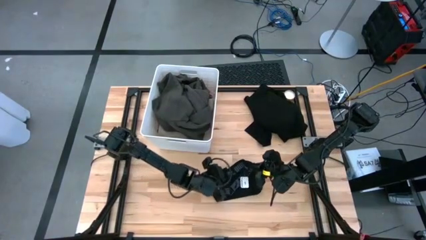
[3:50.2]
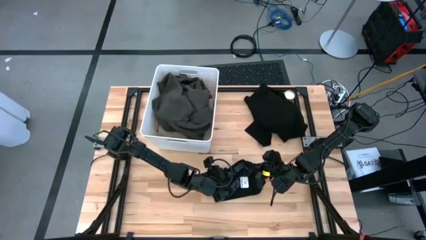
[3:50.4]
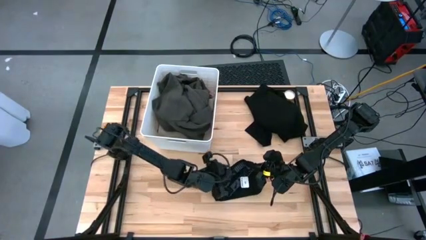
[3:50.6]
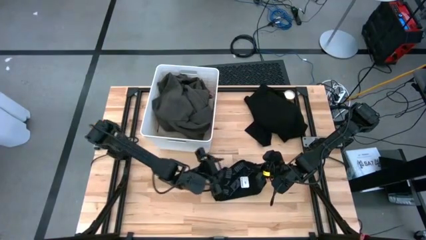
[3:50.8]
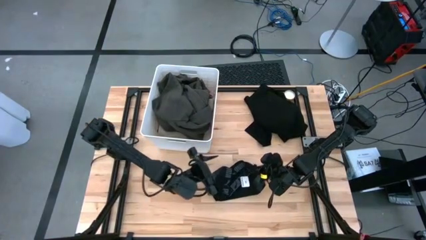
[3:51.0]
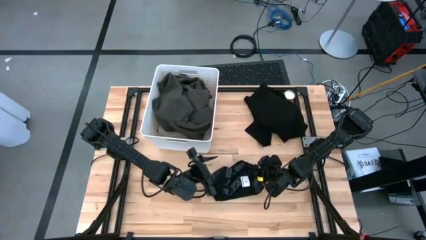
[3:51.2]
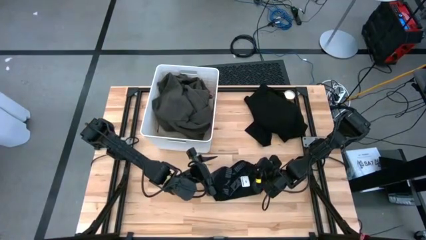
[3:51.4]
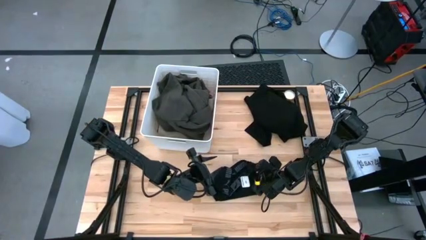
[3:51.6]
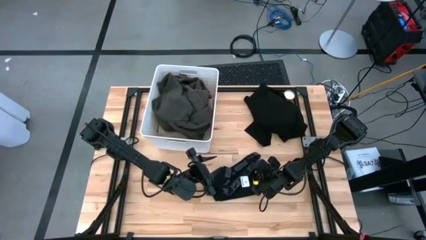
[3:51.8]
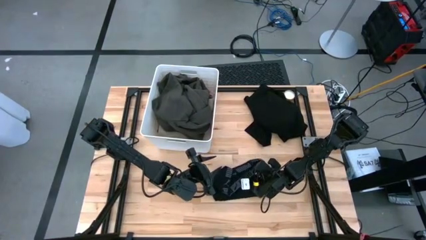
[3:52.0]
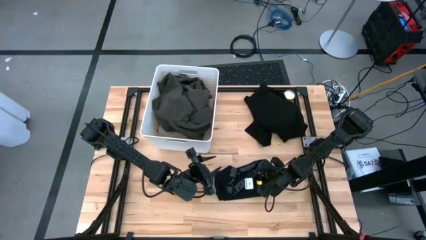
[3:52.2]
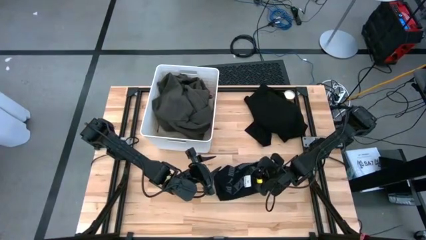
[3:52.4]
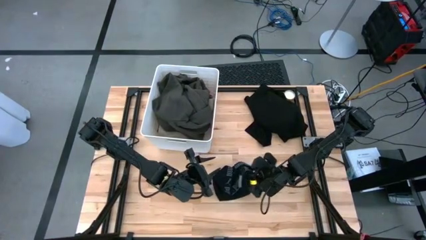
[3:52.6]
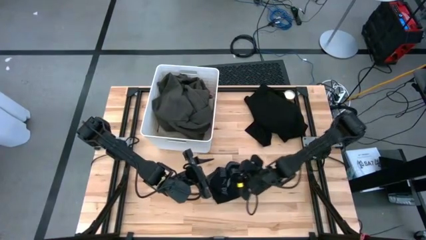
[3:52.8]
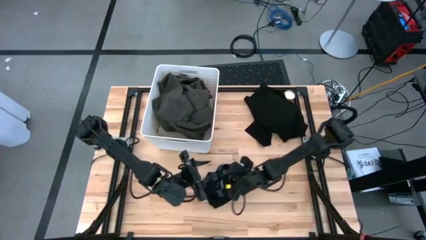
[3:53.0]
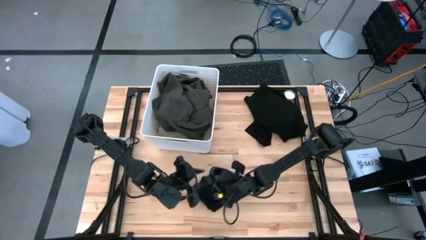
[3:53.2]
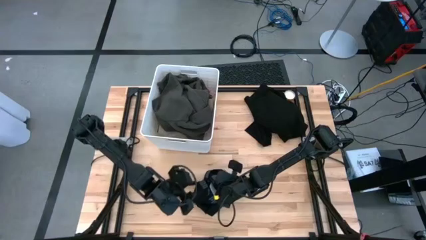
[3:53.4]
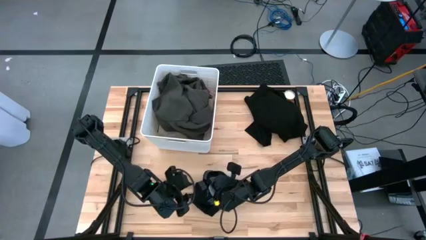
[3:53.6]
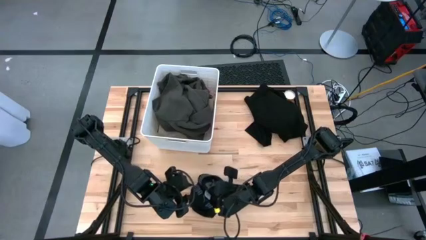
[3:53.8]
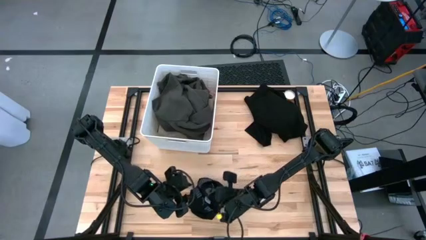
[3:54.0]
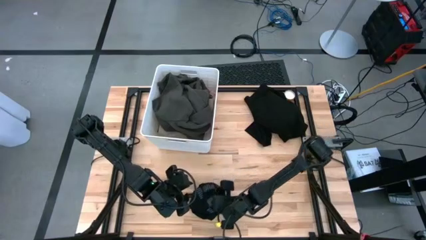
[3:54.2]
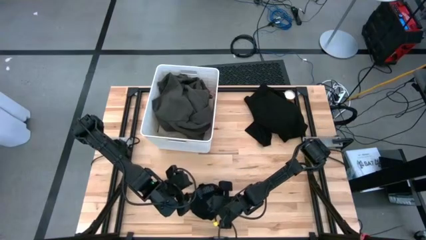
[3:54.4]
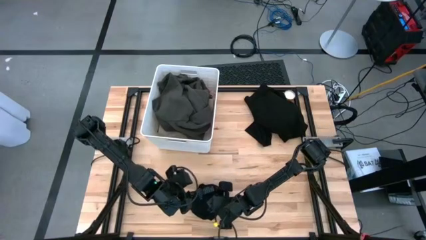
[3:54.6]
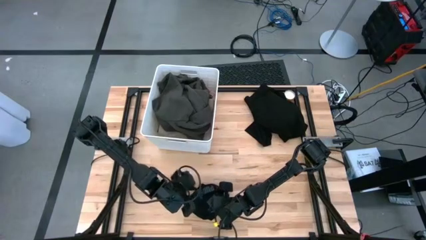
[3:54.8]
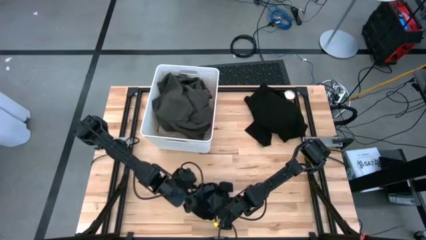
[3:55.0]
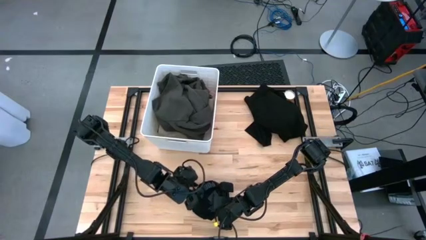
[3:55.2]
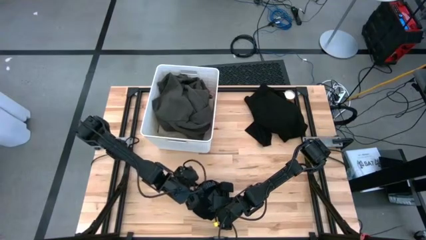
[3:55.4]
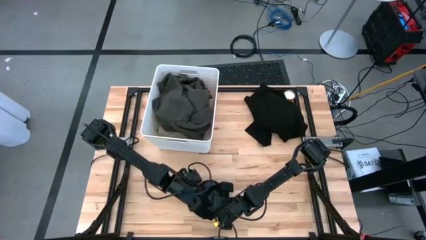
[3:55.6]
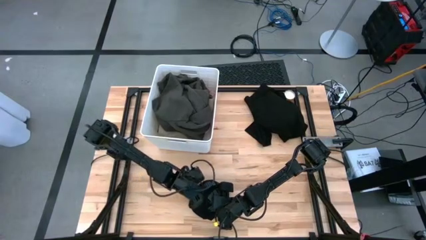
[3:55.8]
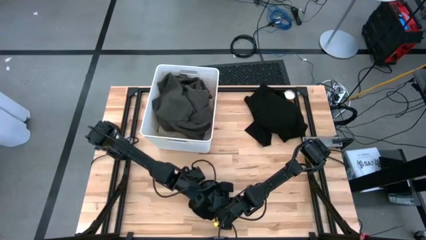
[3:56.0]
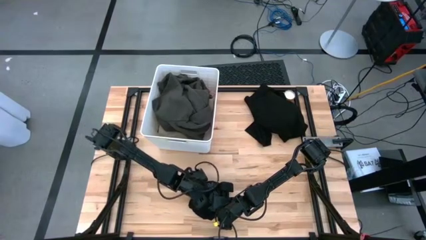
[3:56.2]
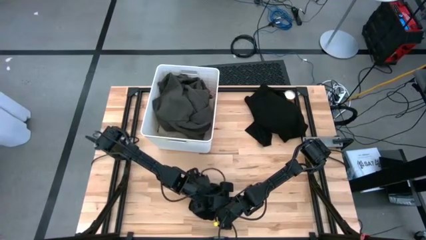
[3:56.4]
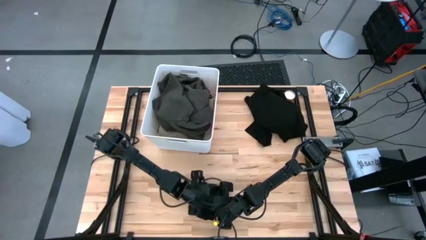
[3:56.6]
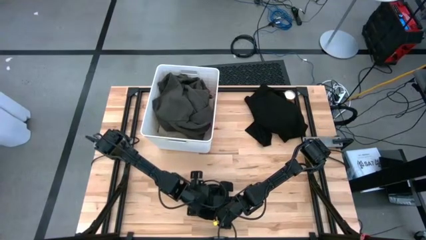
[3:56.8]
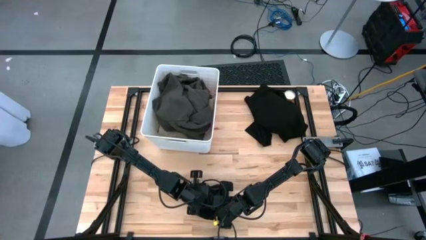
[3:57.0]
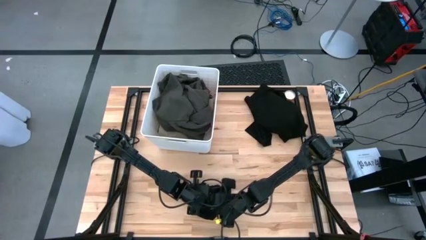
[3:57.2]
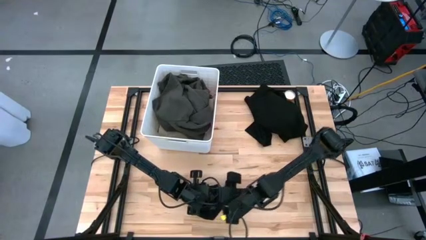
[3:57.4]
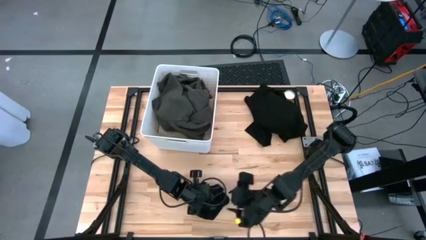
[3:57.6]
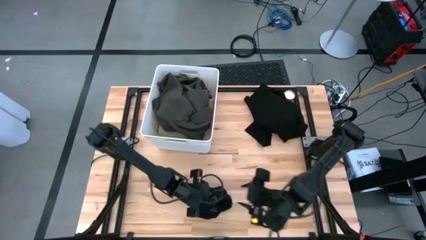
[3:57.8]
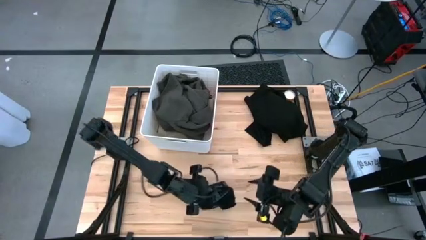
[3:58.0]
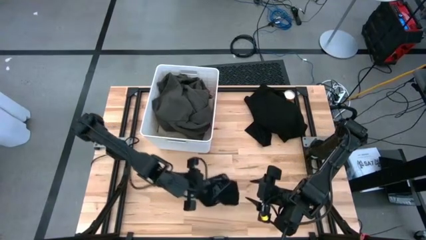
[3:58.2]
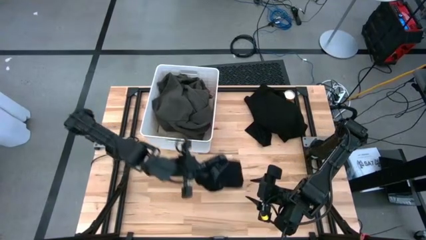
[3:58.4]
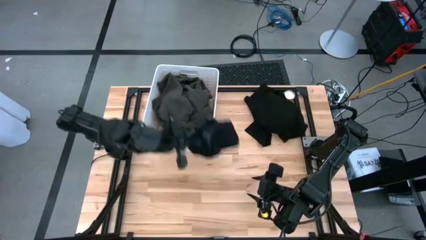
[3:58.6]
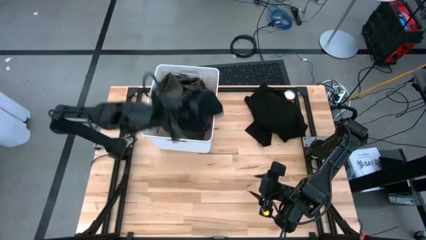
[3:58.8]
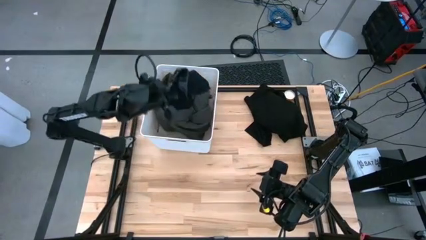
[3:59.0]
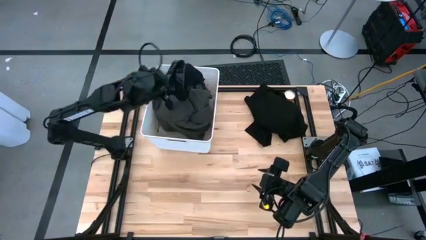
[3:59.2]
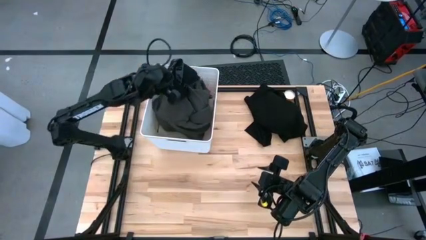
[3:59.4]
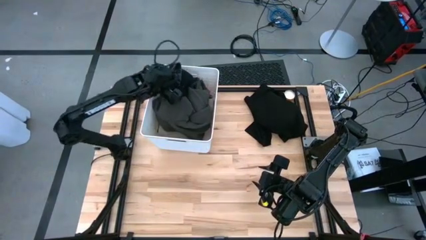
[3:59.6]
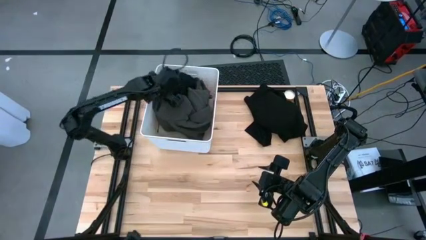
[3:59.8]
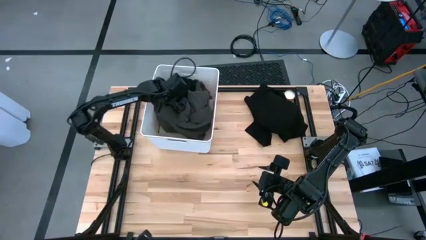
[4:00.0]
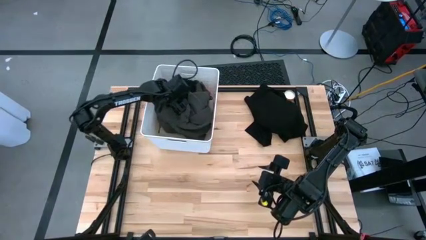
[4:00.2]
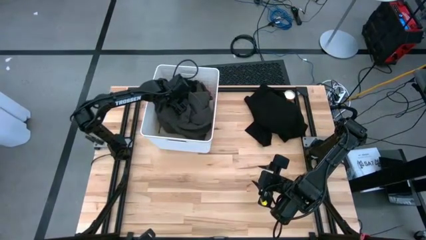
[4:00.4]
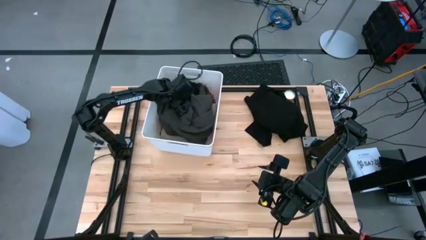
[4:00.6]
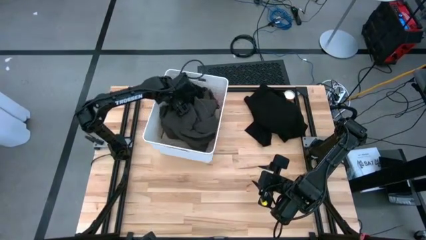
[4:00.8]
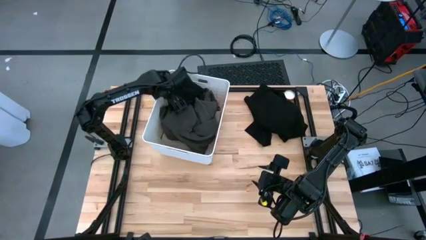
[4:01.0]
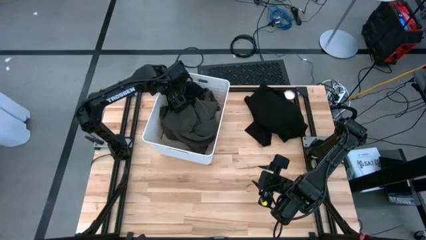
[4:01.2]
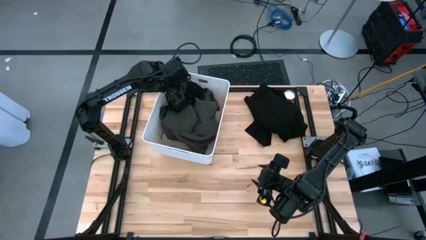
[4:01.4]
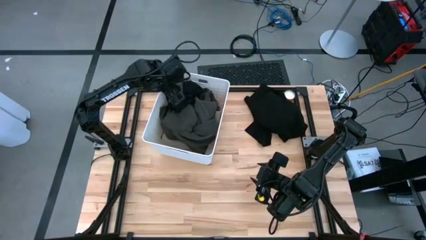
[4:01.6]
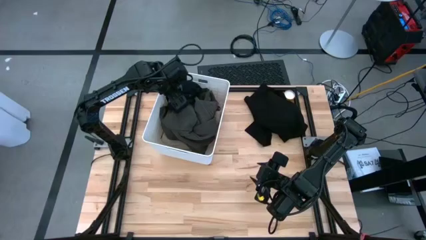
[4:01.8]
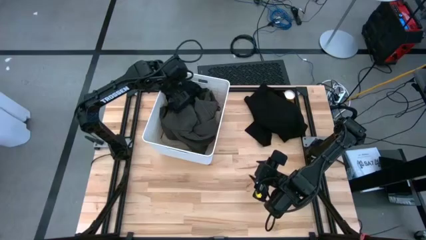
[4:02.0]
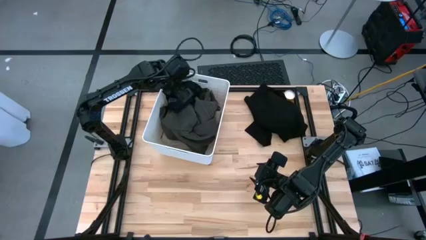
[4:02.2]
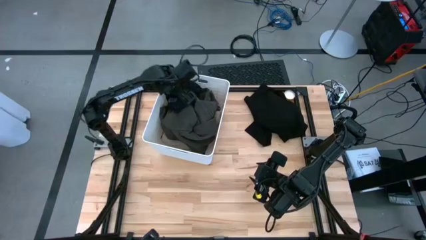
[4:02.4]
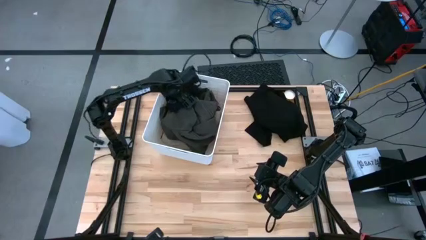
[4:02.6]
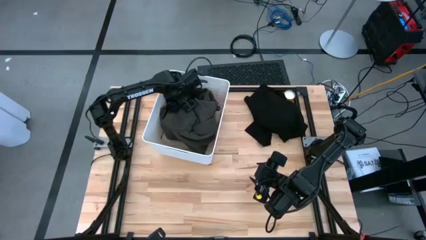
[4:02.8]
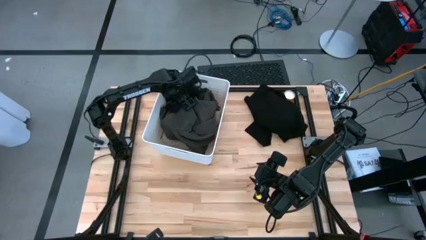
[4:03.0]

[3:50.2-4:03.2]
Task: Sort clothes
Put the black boxer into the white laundry bin

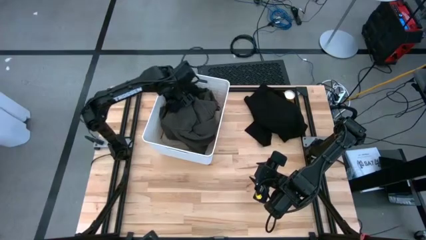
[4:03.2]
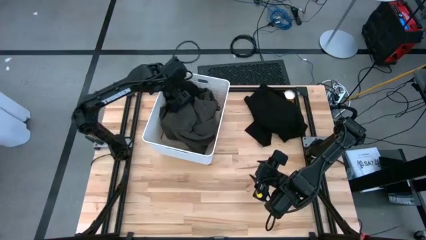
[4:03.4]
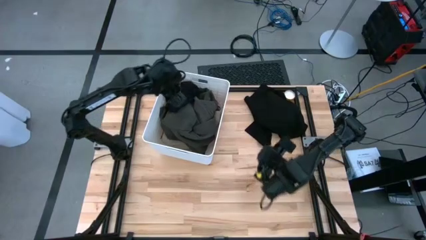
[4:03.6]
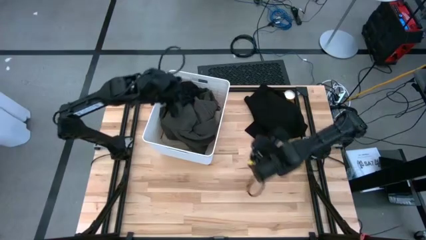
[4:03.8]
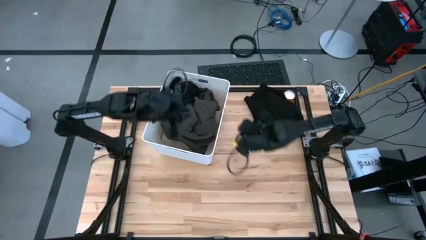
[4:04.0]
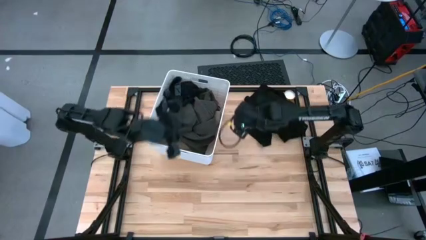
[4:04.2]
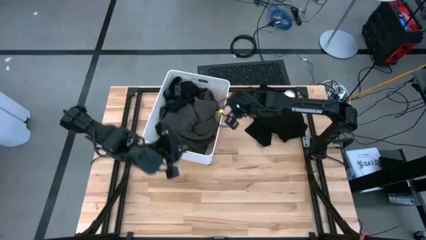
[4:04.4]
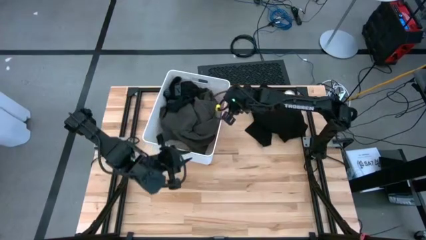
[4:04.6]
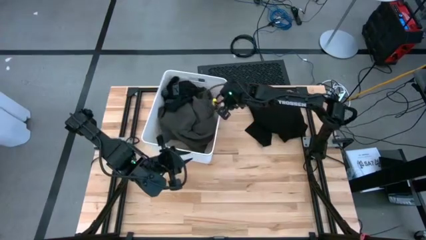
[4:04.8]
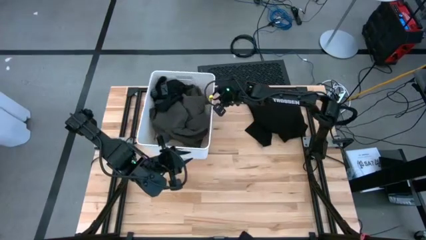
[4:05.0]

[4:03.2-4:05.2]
Adjust the white laundry bin on the table
